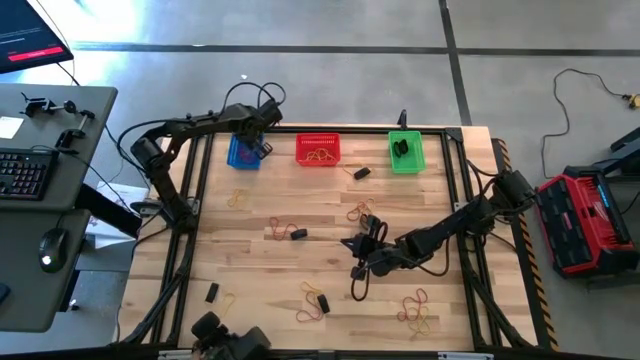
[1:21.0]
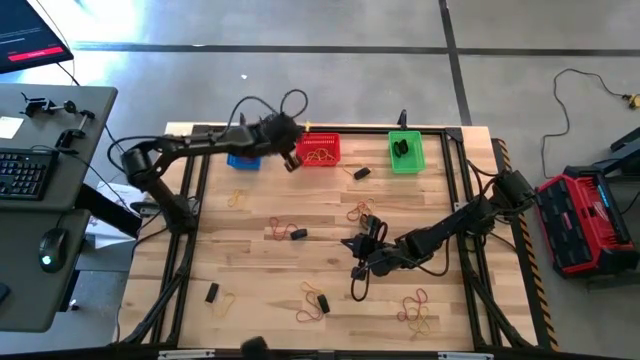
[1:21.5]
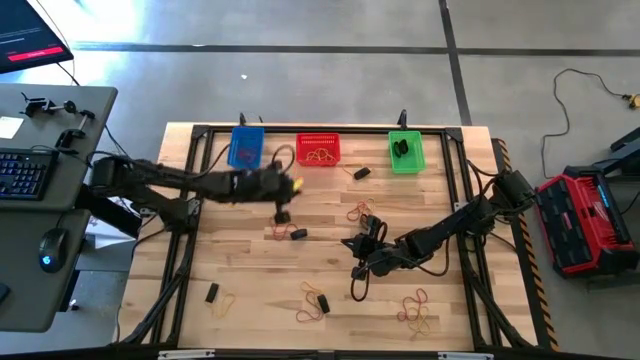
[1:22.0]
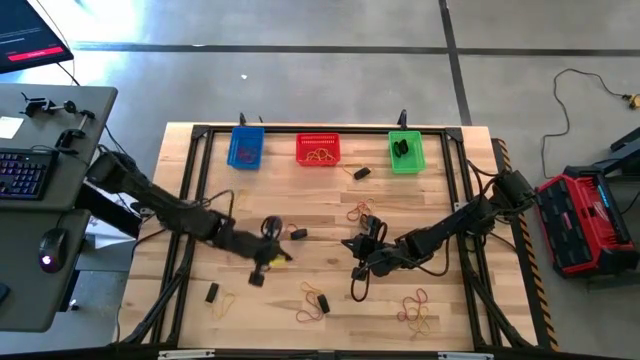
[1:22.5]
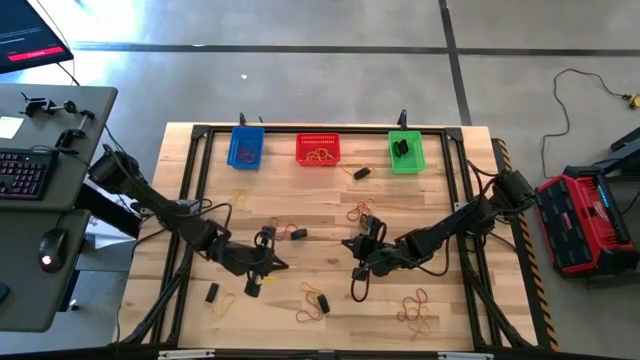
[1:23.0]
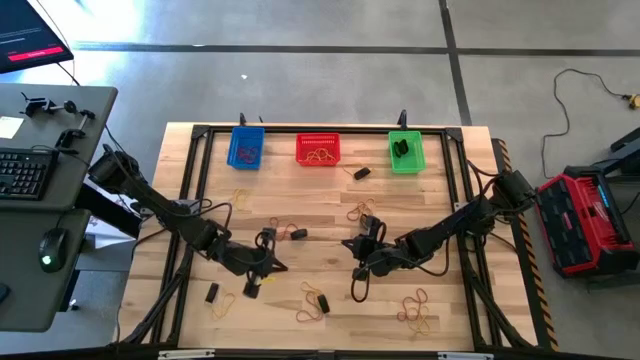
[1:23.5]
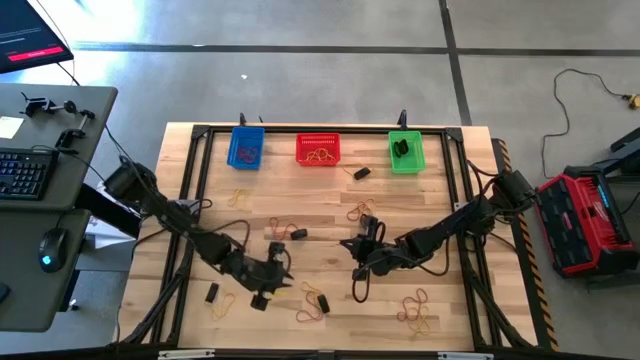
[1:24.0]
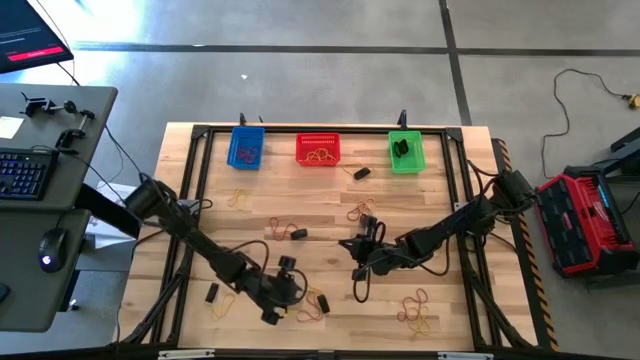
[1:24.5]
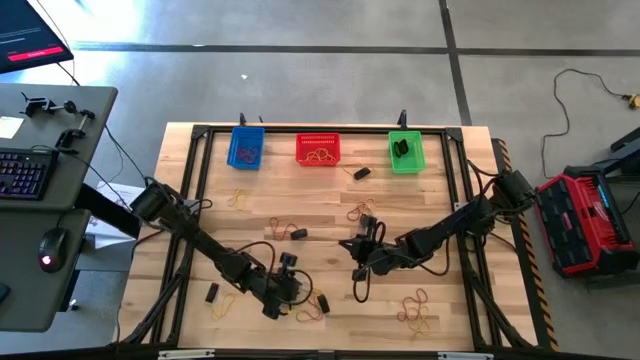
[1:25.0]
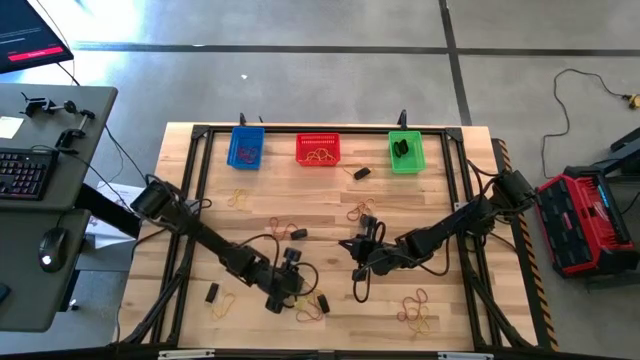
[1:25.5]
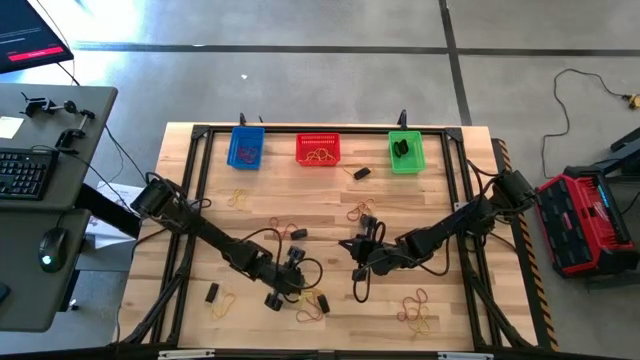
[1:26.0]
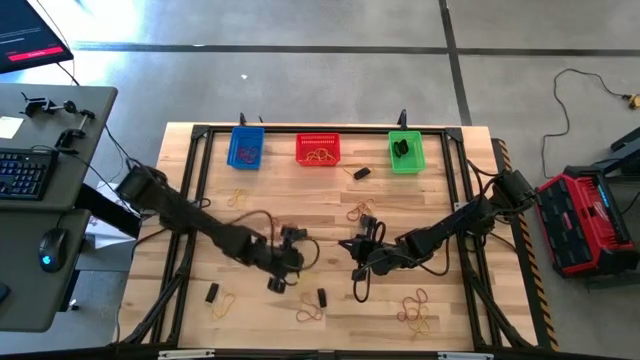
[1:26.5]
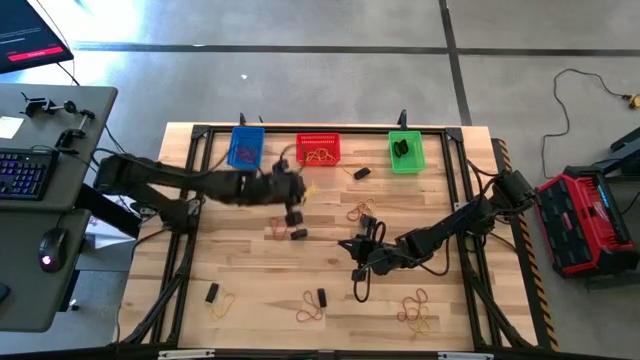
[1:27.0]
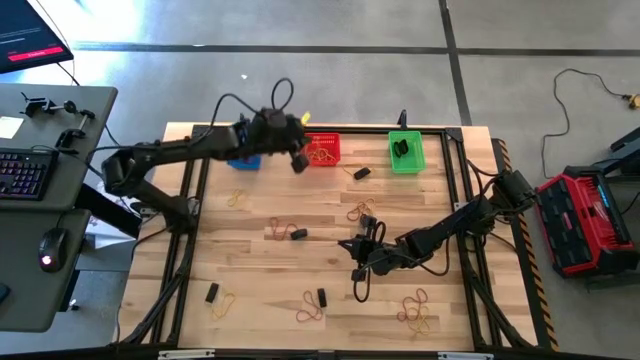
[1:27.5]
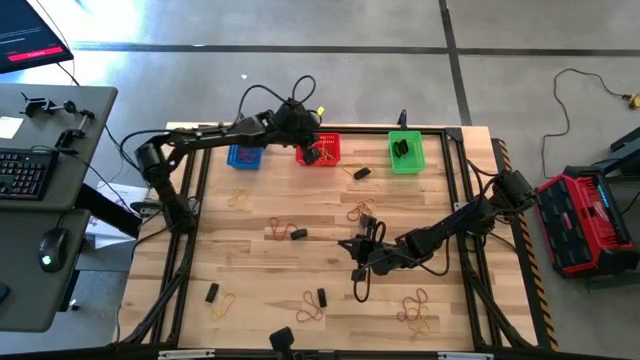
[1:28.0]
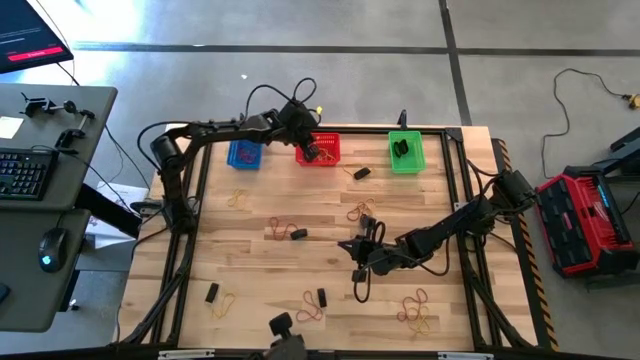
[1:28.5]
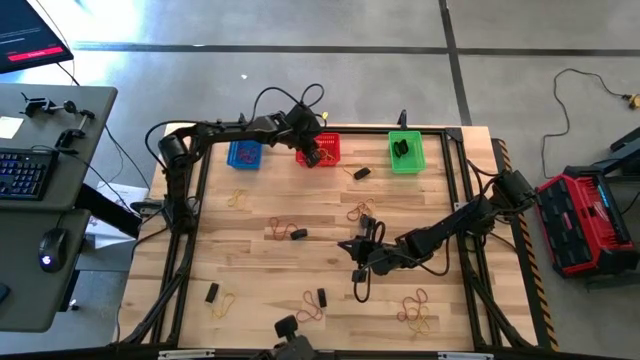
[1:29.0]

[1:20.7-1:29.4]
Task: Sort rubber bands into baskets
Put the yellow rubberband into the orange bin

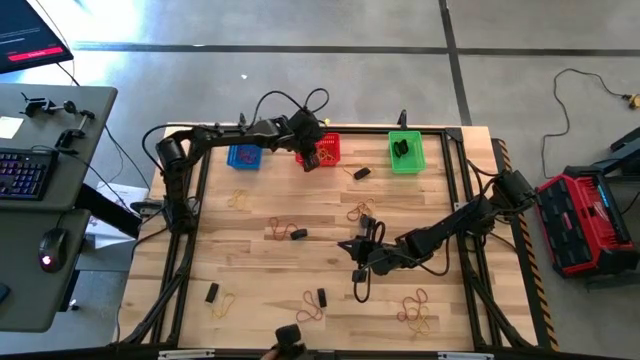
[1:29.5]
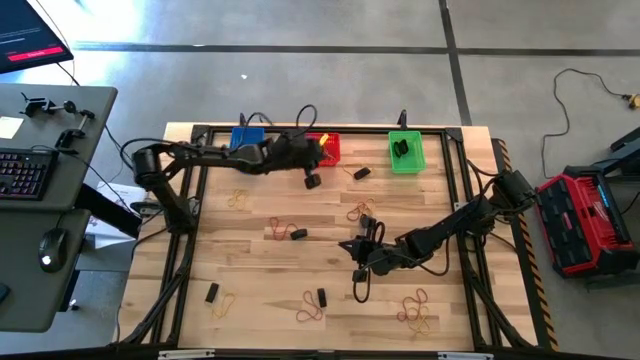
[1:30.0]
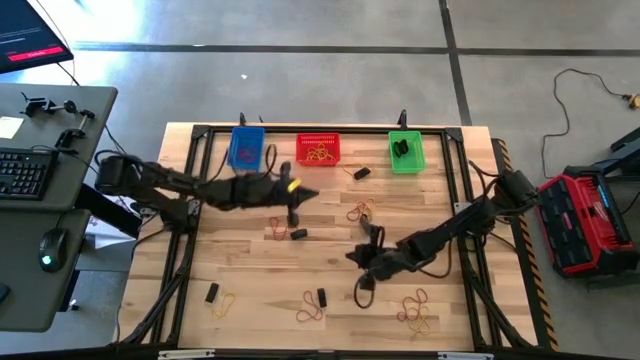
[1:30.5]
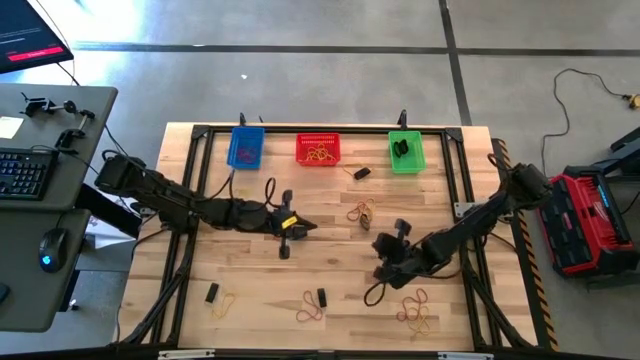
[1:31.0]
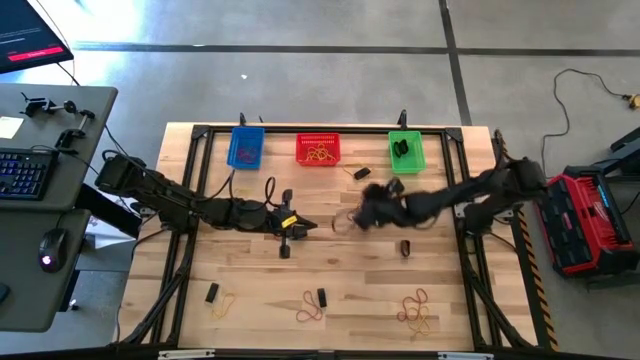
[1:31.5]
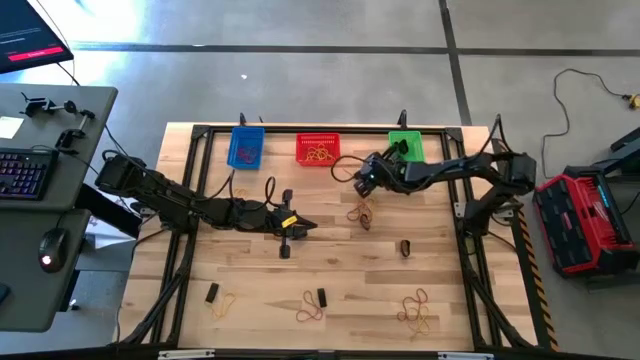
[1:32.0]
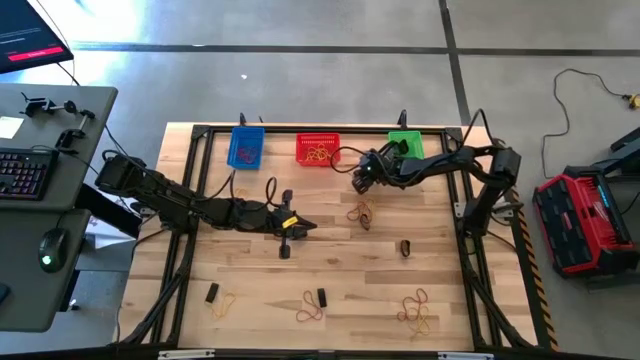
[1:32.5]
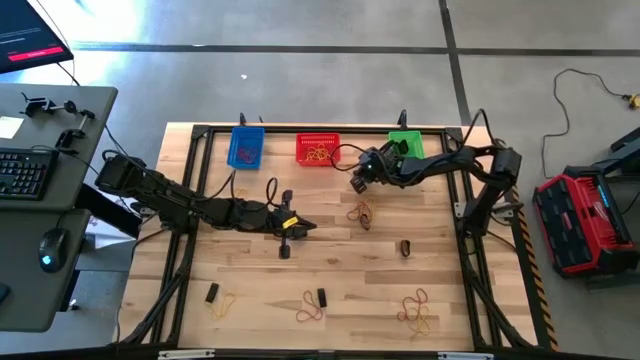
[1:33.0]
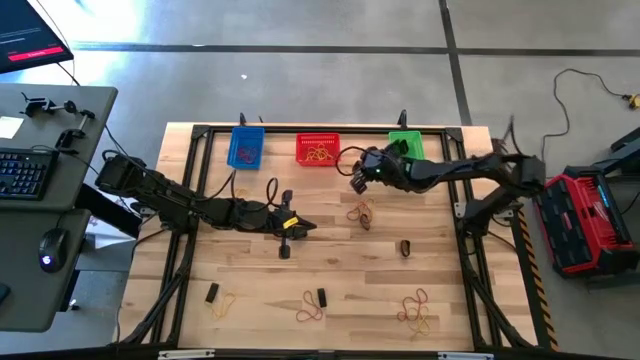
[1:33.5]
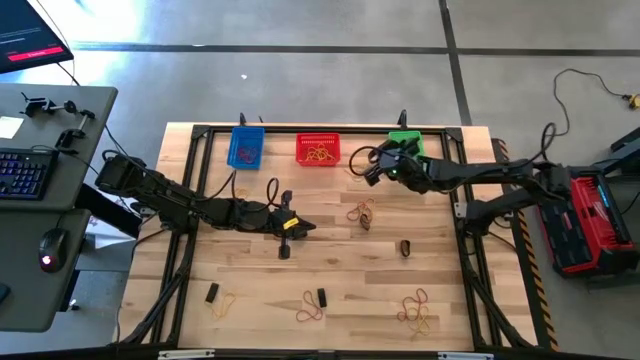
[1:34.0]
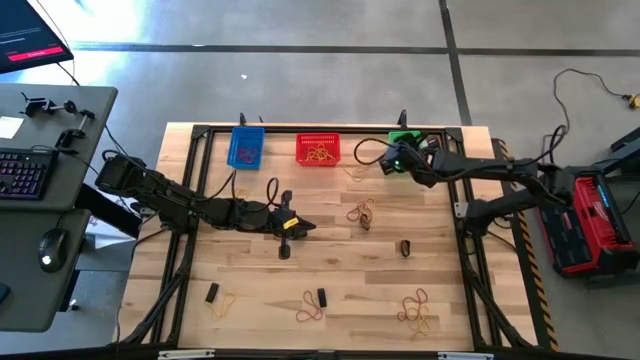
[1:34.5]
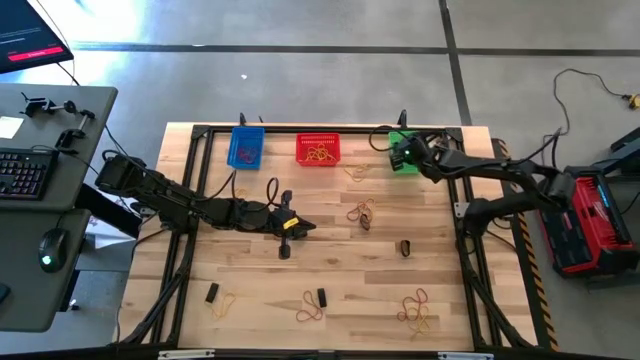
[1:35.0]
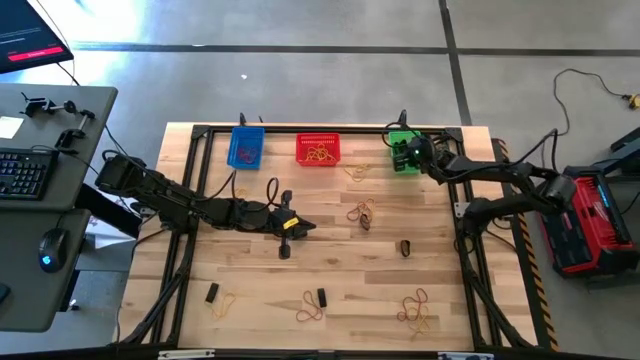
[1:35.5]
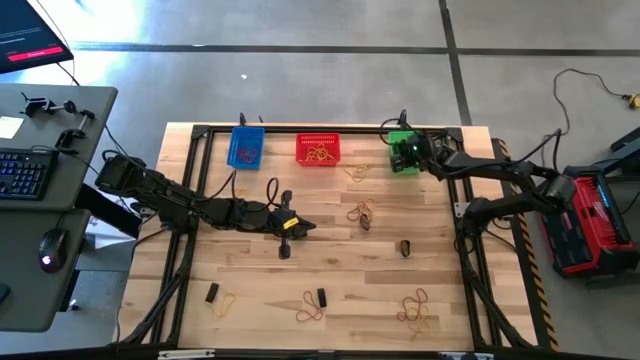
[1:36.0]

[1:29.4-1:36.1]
Put the black rubberband into the green bin

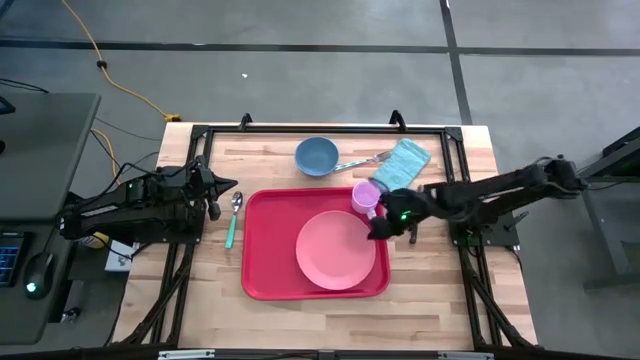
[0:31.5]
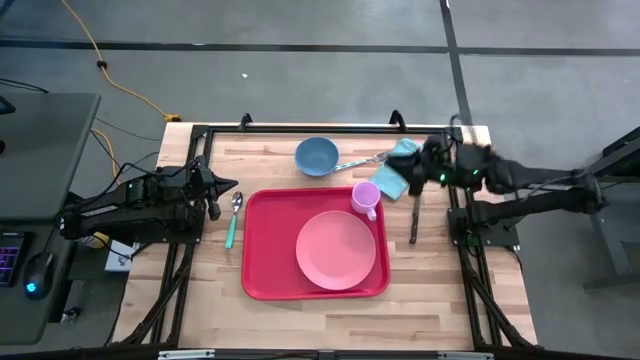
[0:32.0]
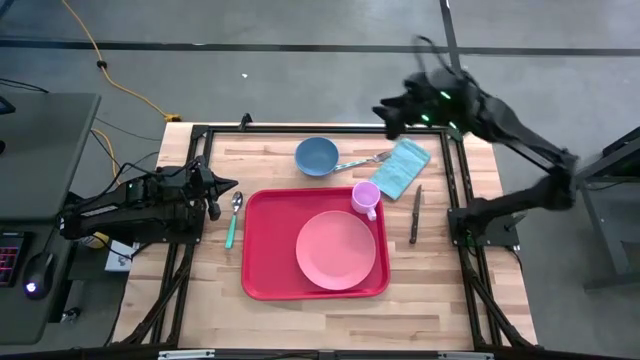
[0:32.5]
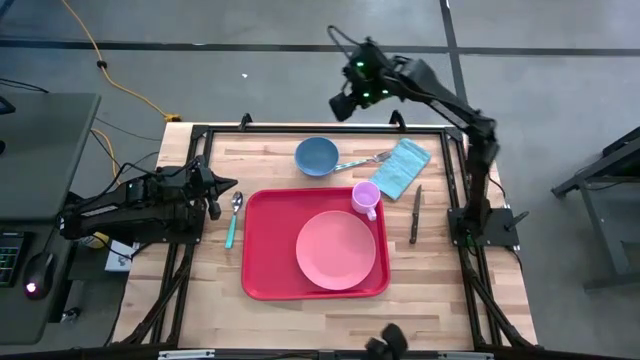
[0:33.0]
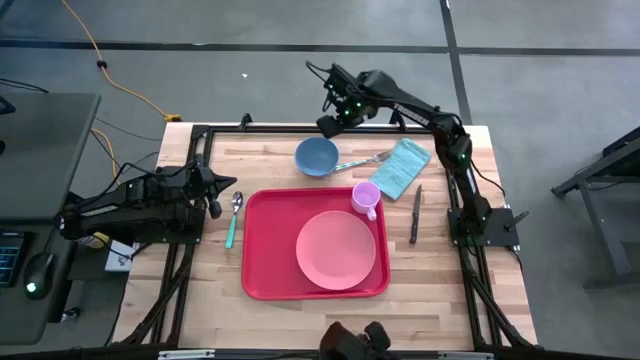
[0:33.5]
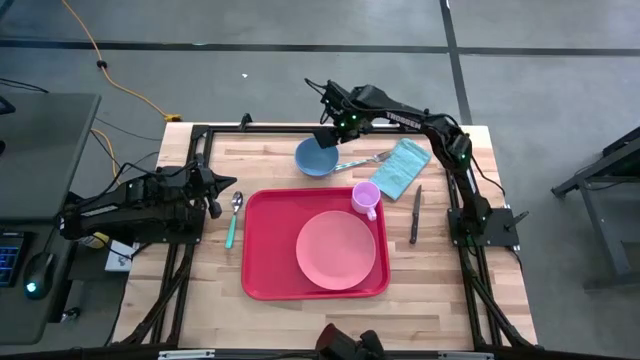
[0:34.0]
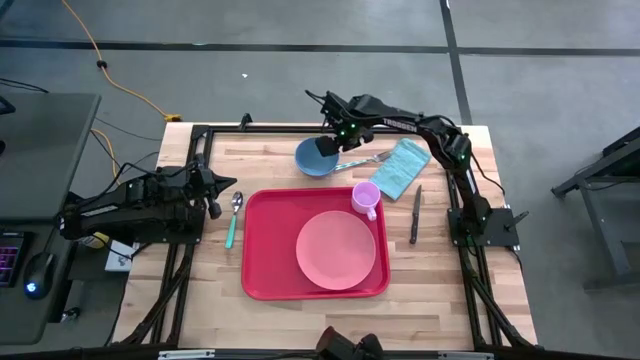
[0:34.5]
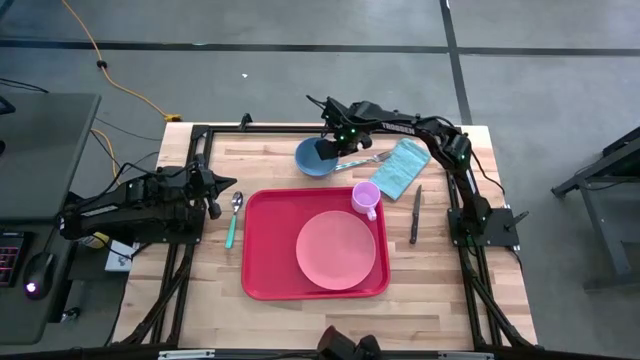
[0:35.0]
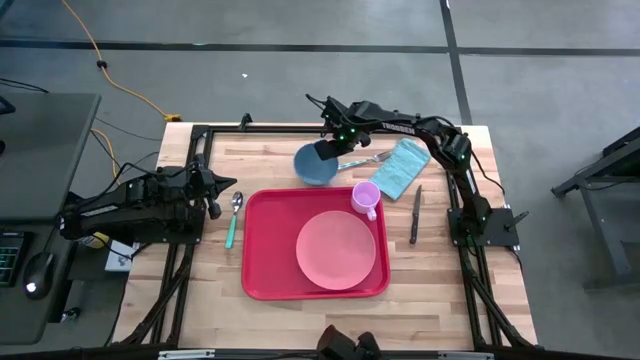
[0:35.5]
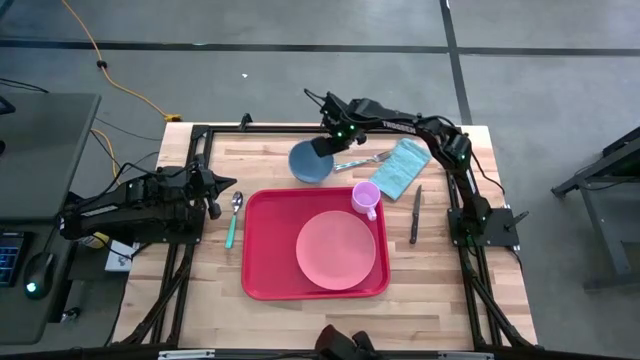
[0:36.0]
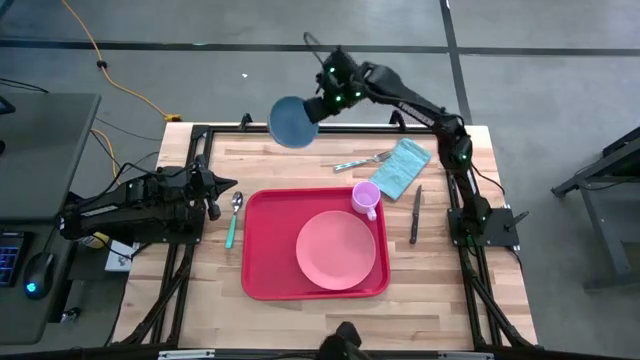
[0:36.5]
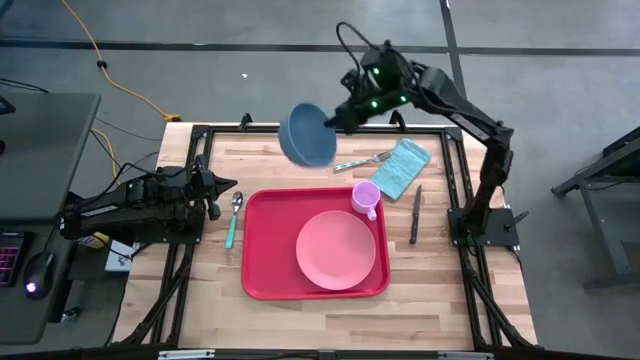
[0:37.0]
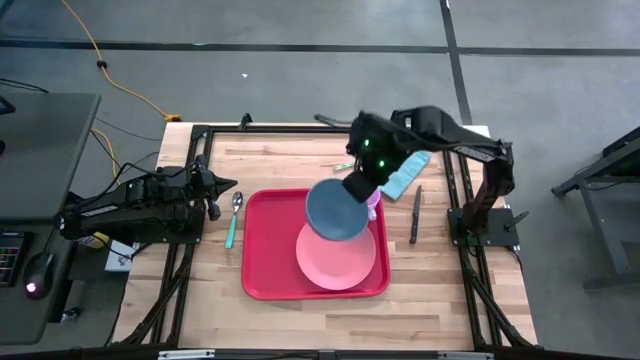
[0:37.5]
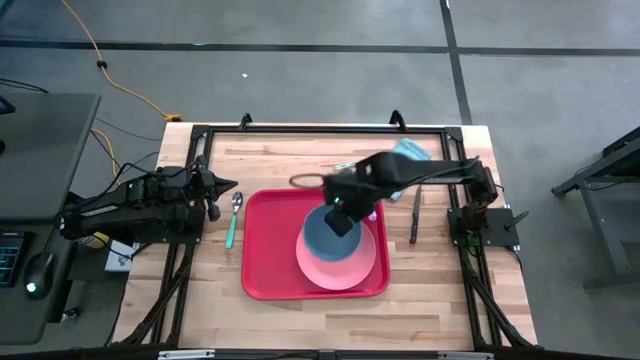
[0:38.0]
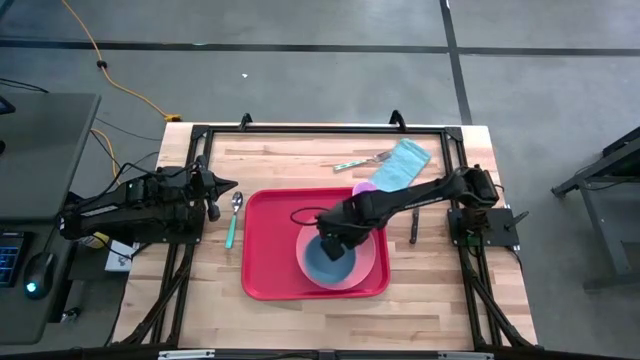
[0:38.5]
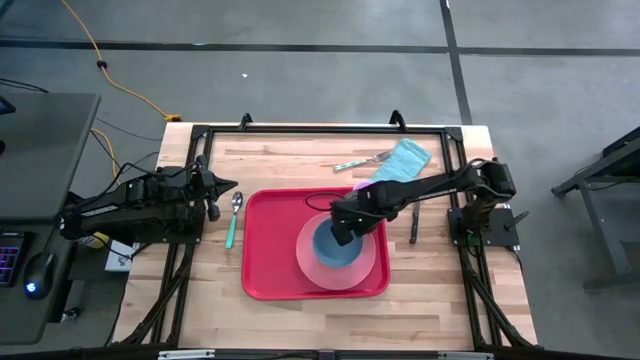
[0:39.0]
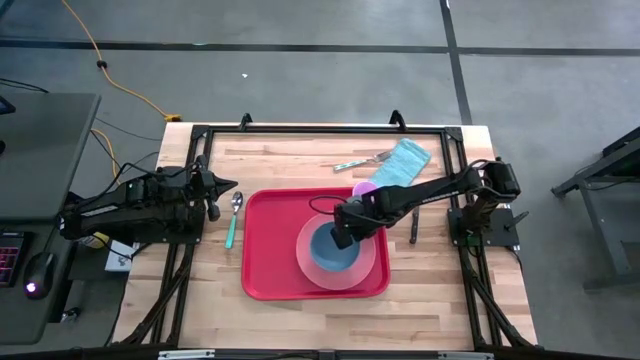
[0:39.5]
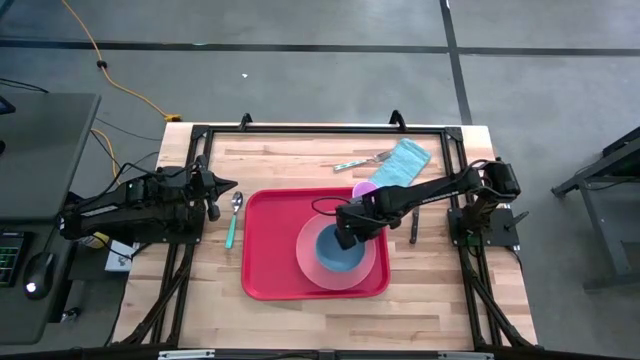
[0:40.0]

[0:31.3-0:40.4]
Task: Set up tray
Put the blue bowl on top of the pink plate
